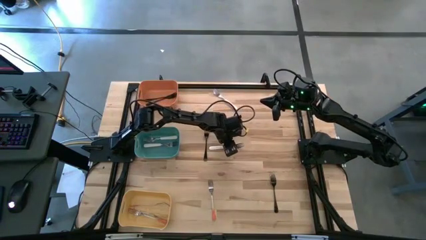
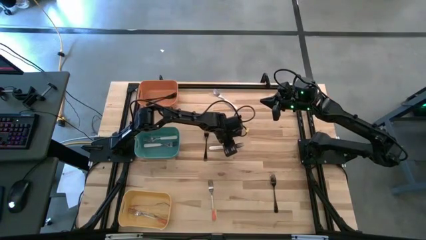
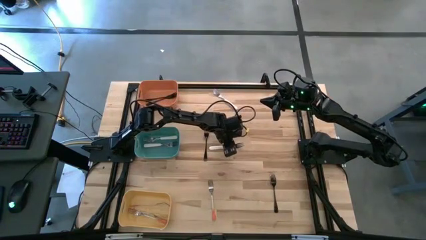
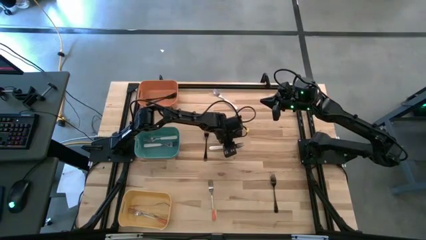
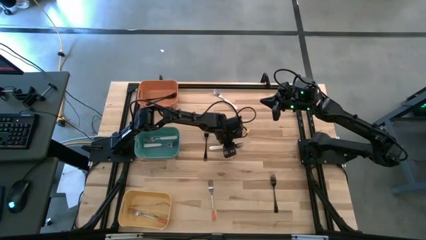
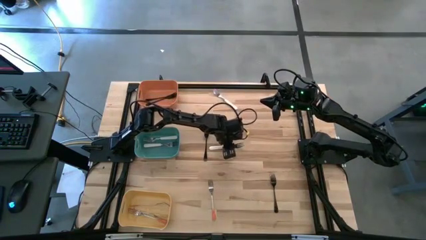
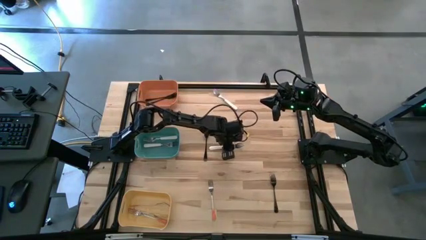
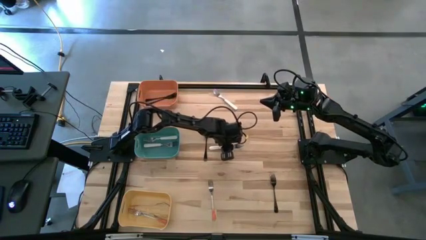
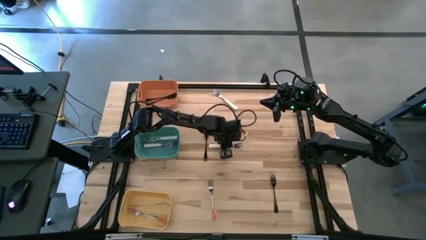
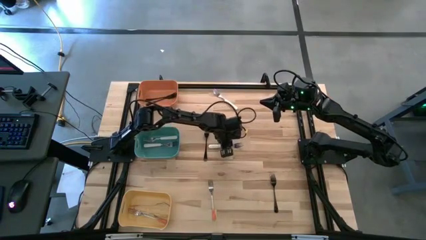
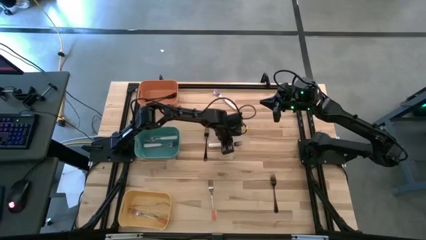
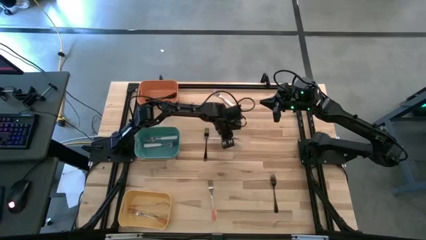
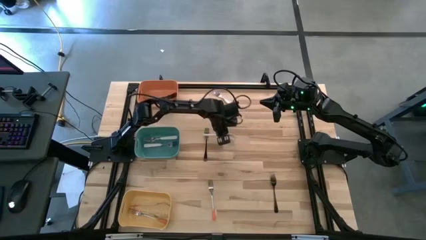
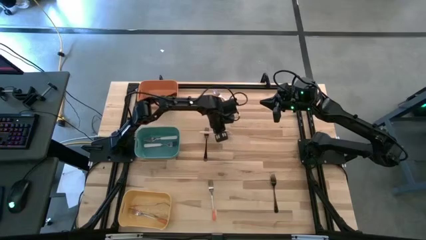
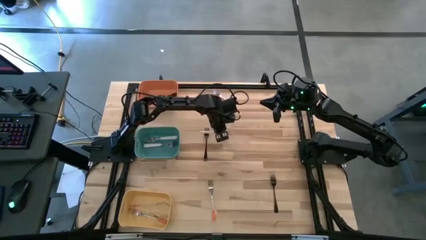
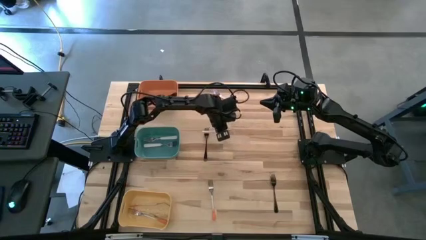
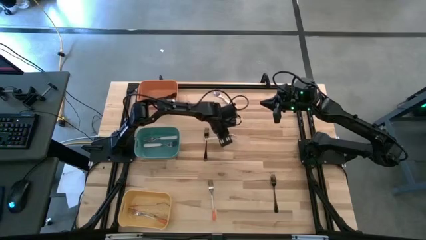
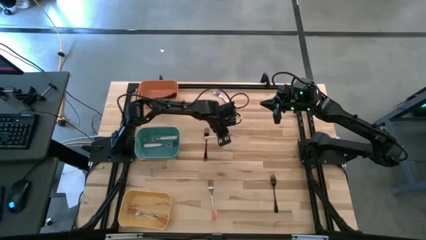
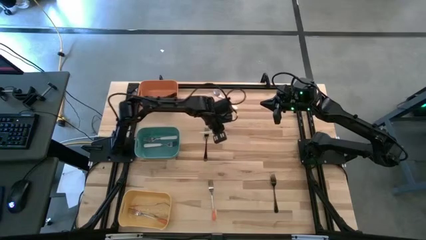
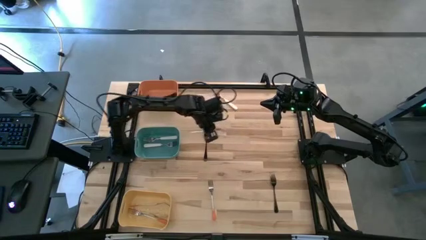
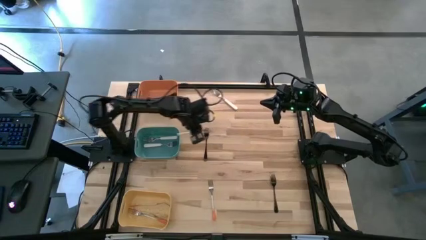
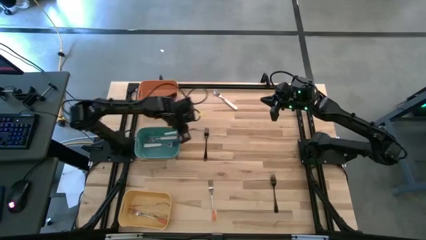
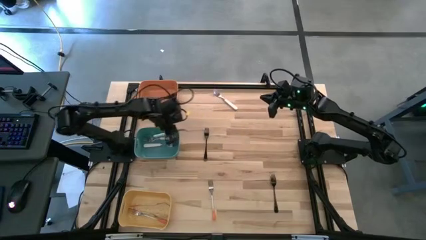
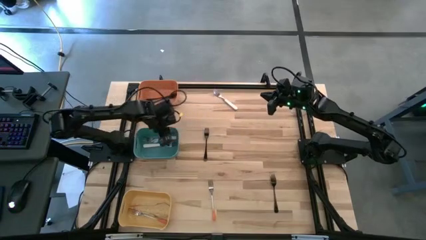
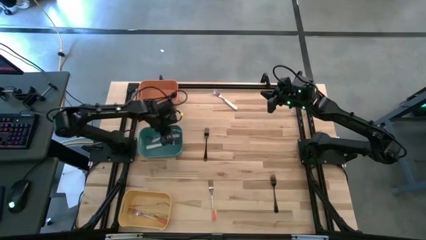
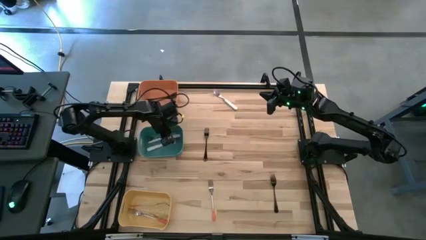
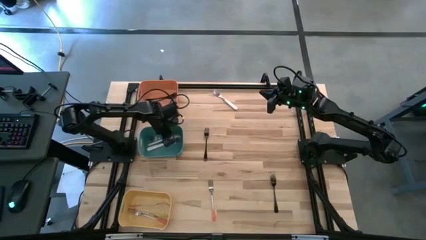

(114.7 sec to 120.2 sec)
Task: Sort silverware by color (type)
Put the white fork into the green bin

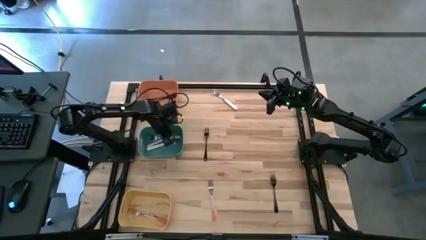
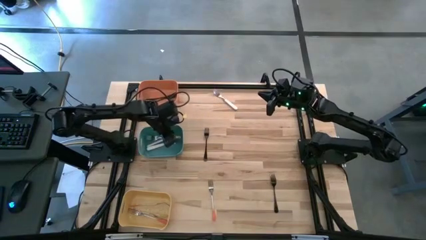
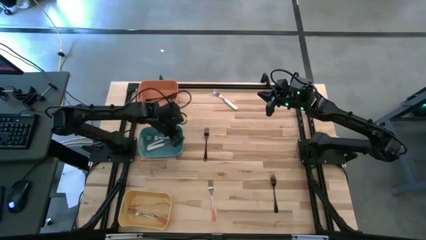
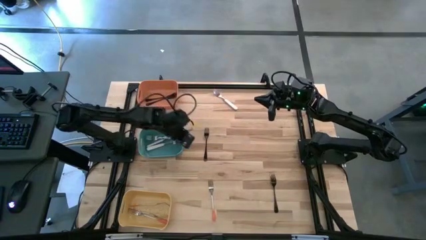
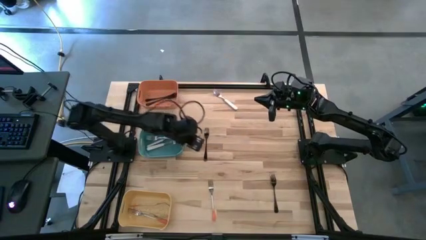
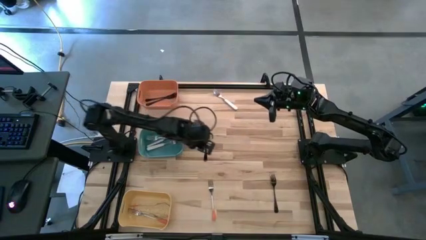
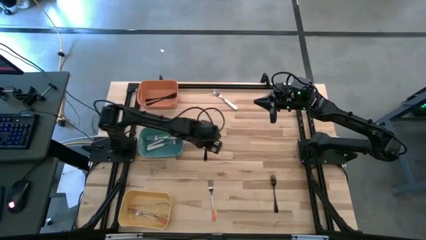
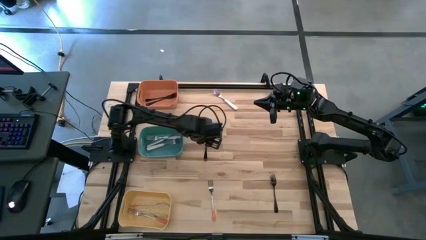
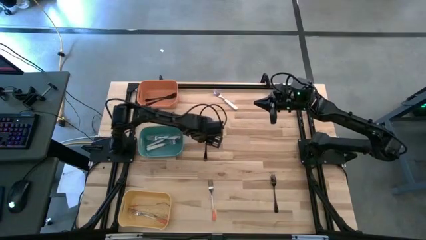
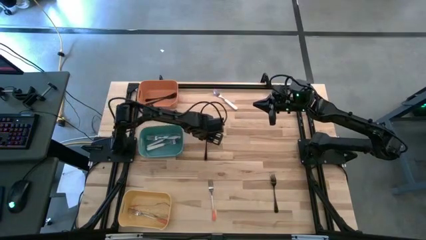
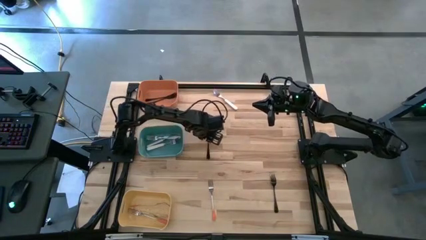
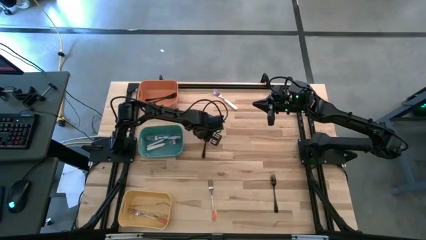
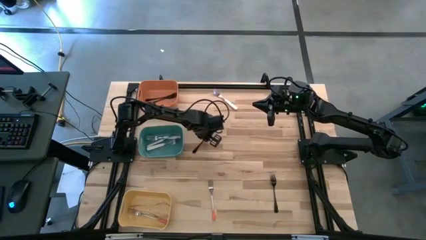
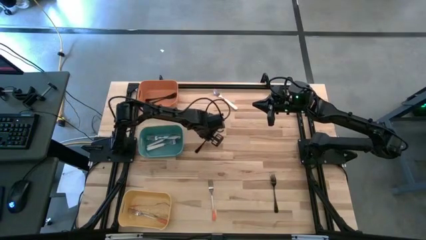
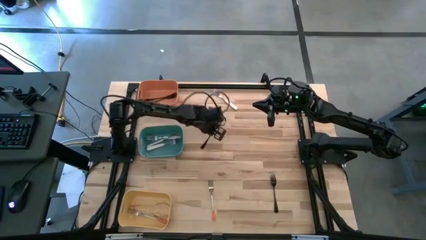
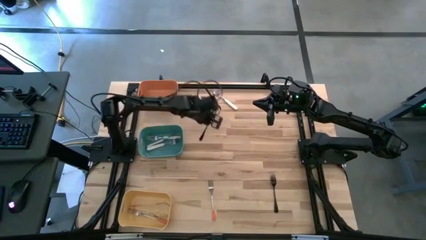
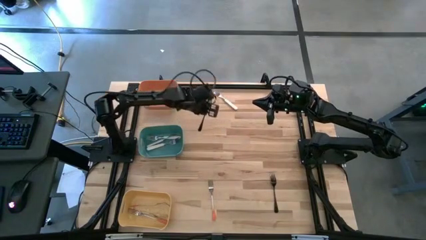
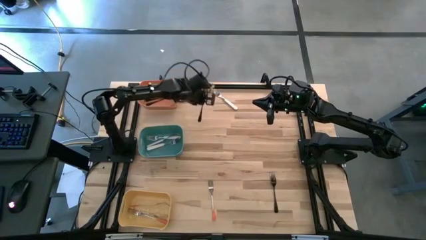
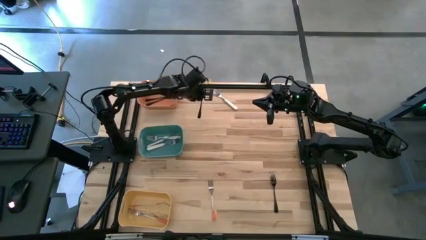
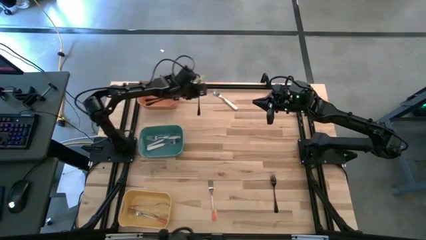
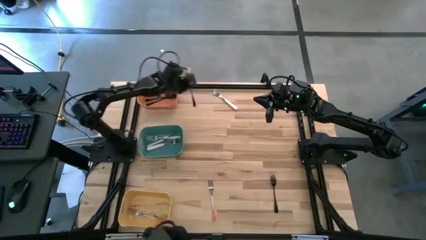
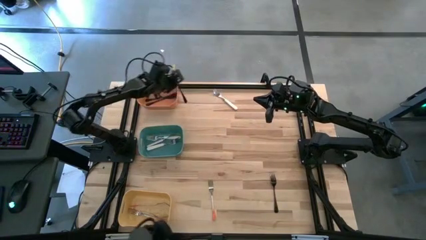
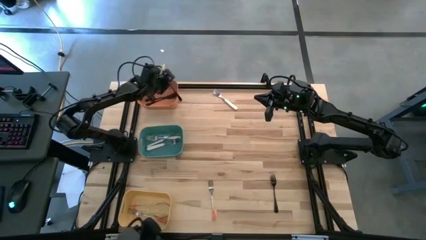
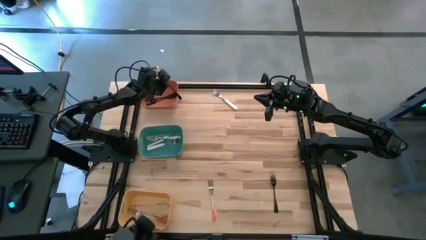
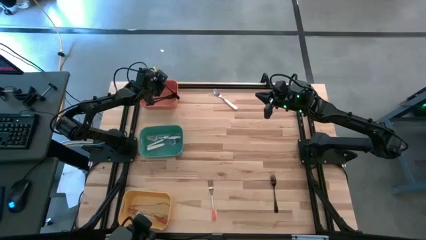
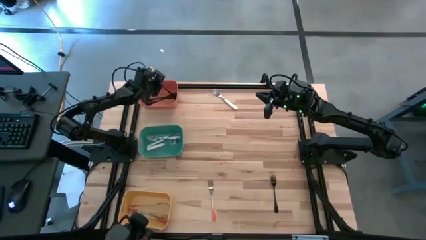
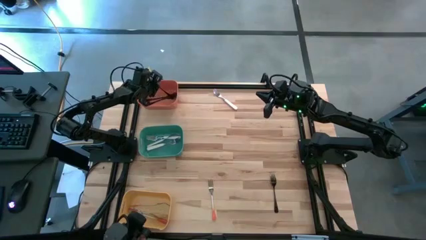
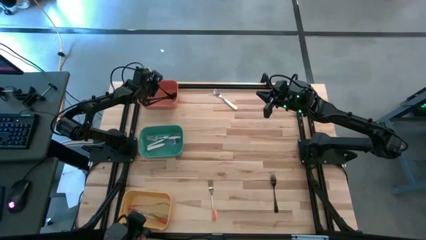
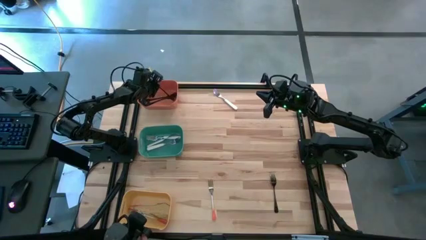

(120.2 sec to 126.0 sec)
Put the black fork into the orange bin

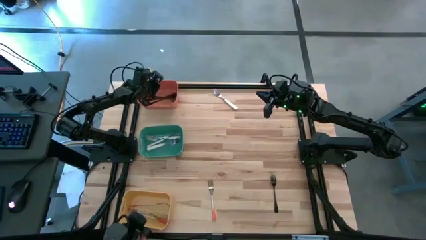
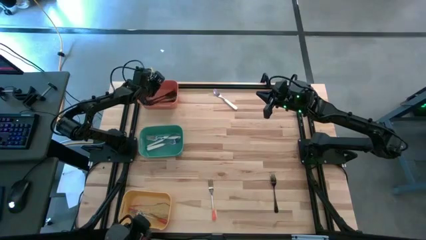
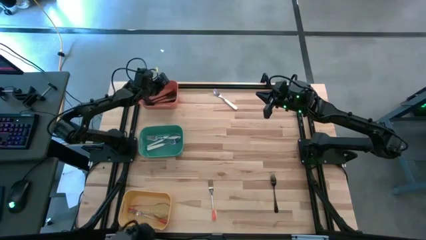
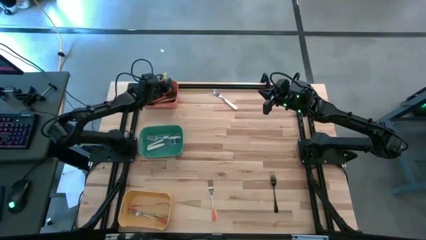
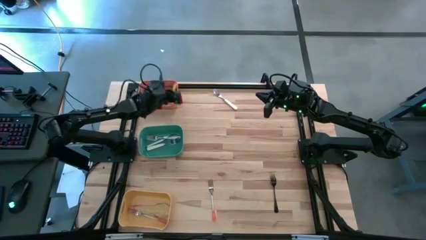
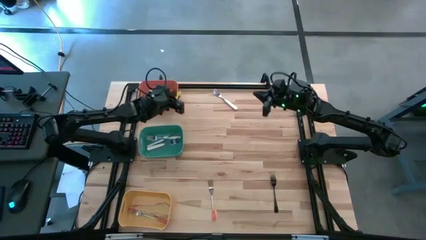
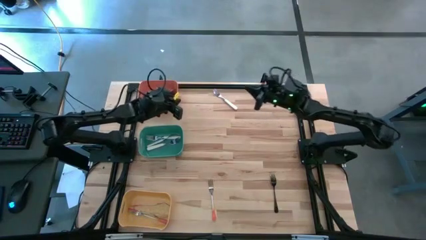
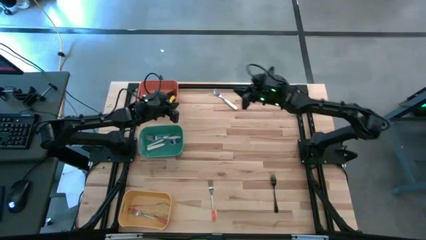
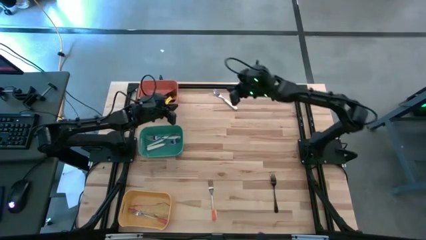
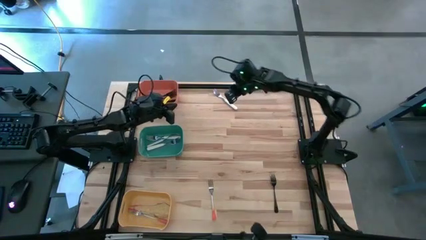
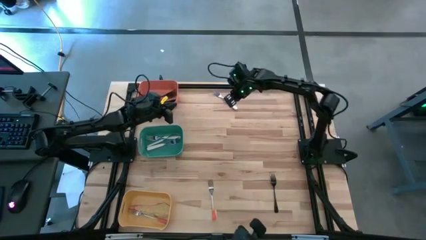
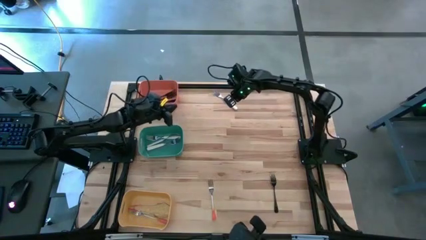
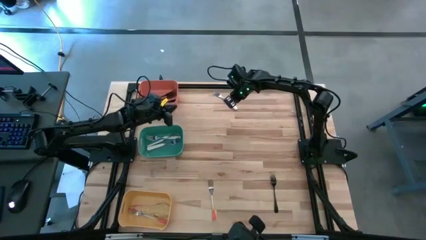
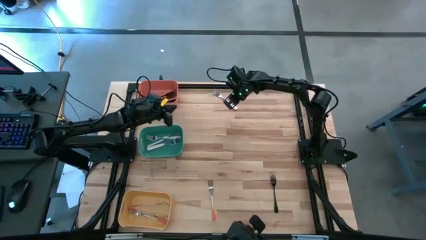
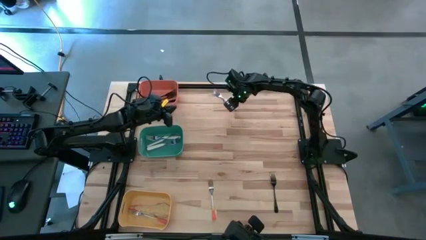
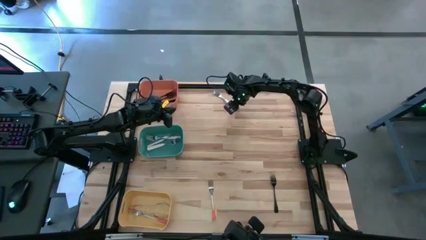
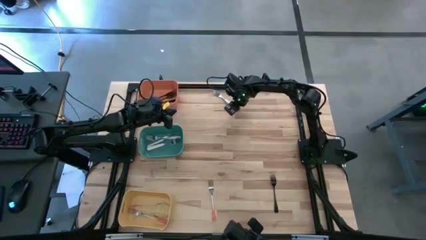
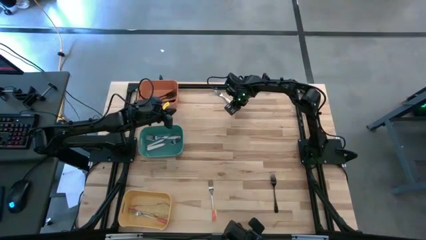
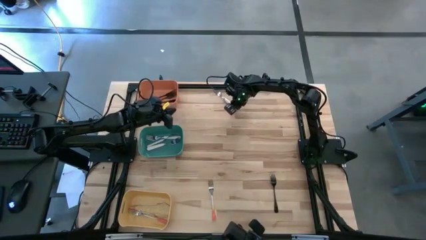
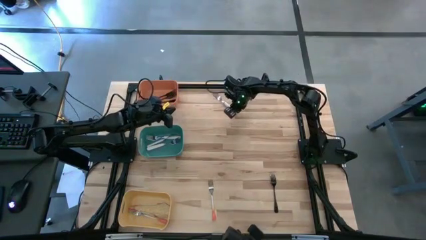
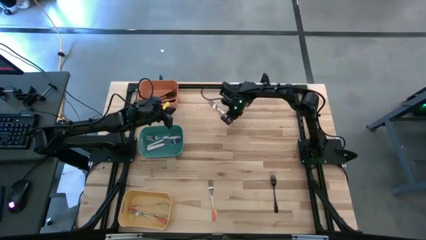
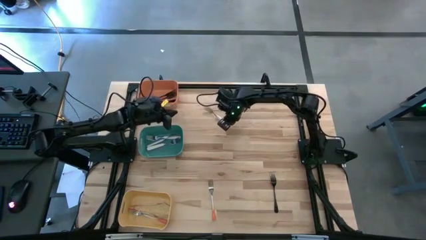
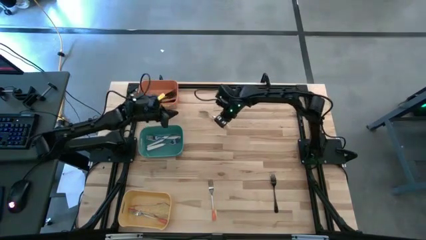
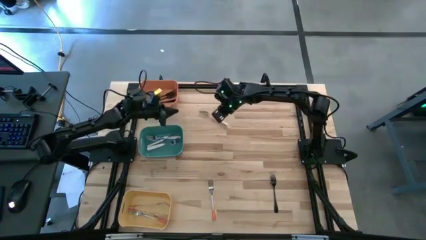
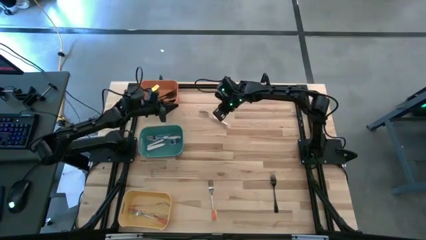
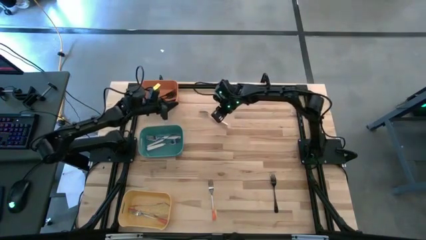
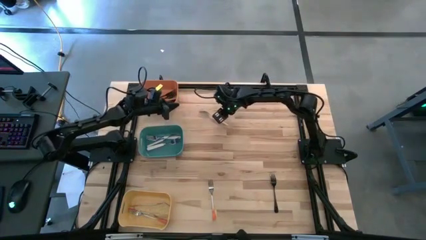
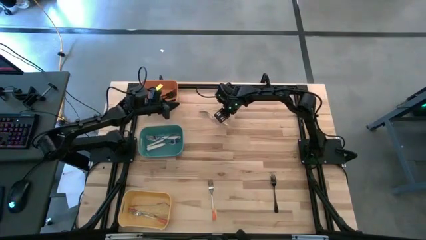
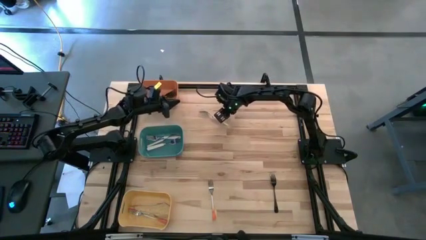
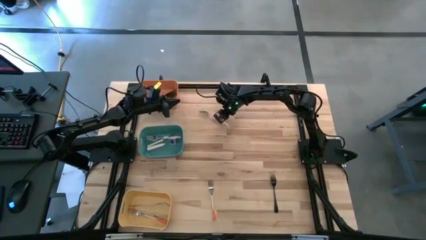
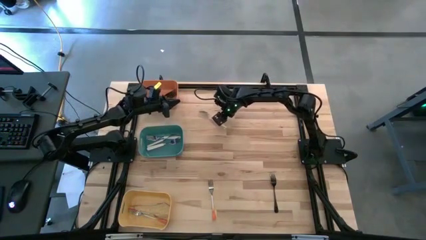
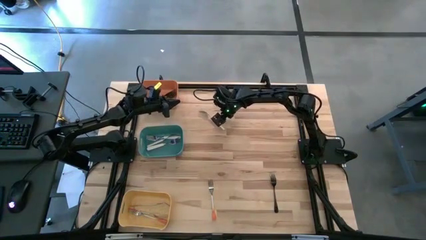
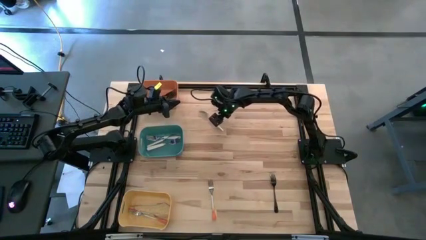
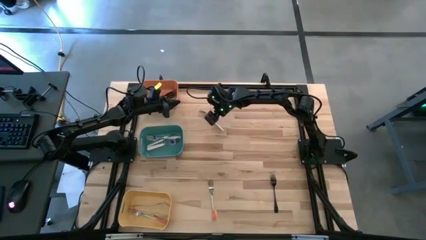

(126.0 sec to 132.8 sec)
Put the white fork into the green bin
